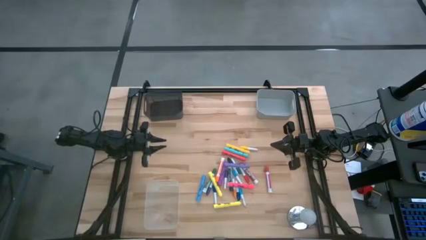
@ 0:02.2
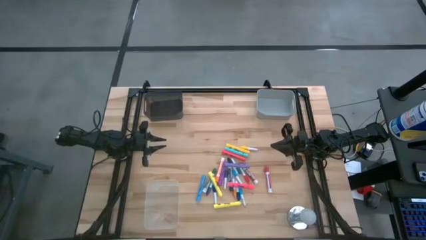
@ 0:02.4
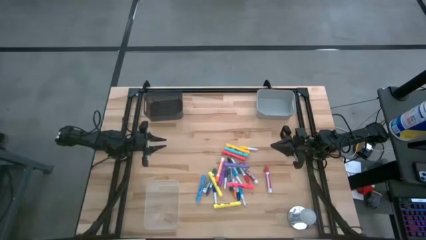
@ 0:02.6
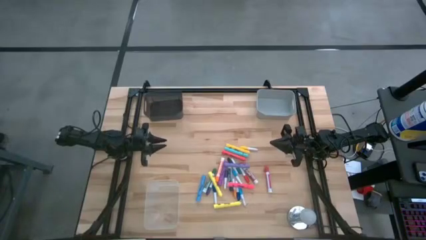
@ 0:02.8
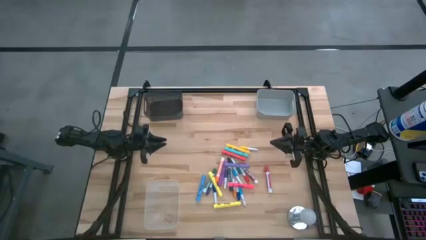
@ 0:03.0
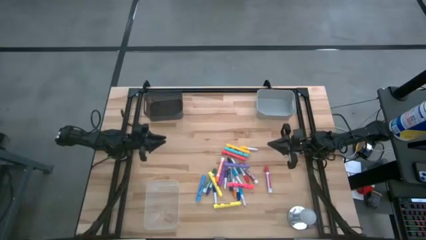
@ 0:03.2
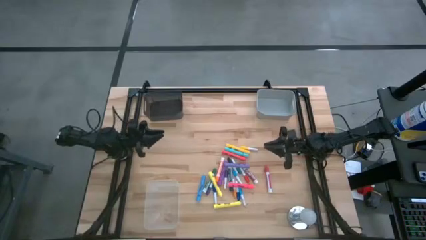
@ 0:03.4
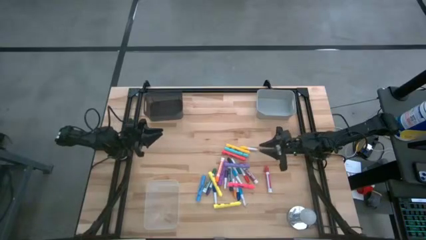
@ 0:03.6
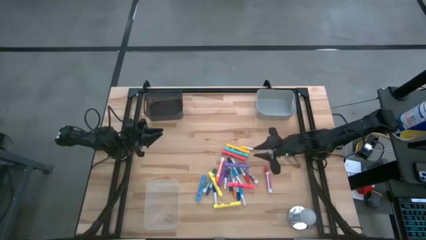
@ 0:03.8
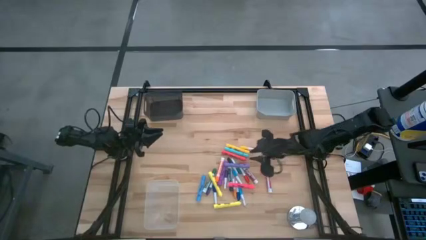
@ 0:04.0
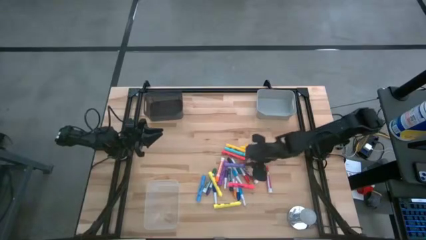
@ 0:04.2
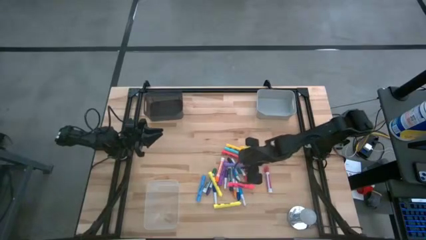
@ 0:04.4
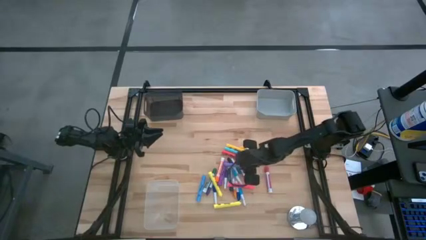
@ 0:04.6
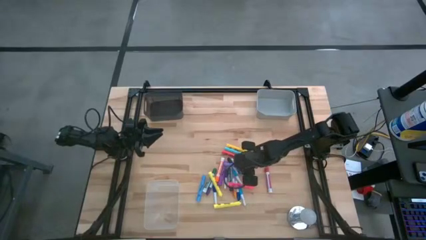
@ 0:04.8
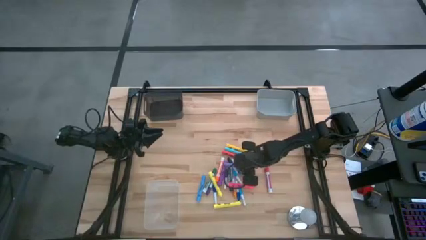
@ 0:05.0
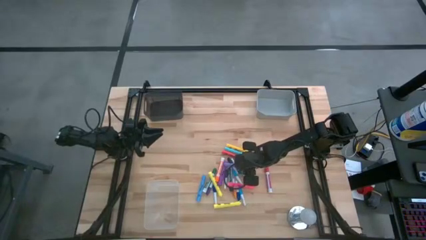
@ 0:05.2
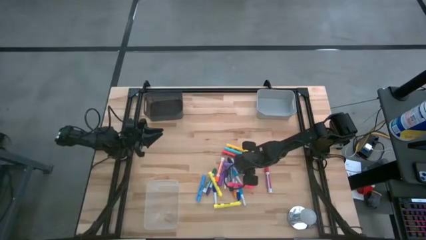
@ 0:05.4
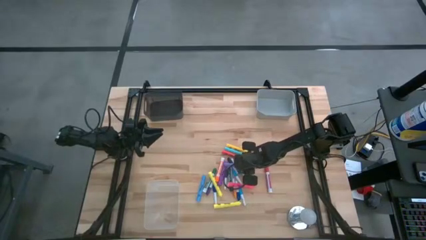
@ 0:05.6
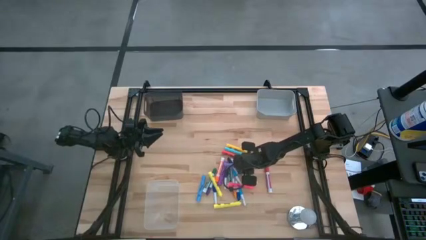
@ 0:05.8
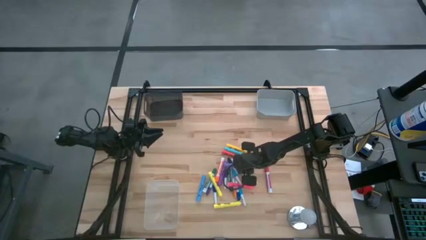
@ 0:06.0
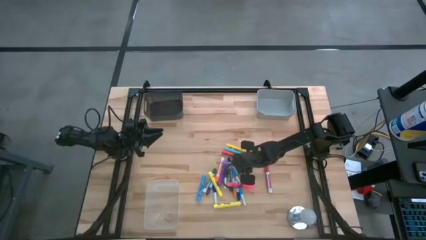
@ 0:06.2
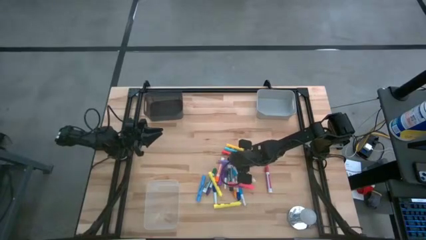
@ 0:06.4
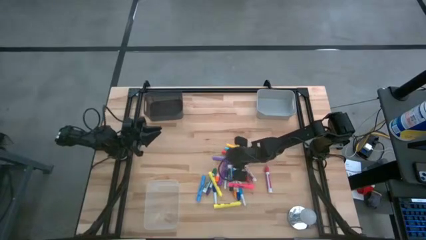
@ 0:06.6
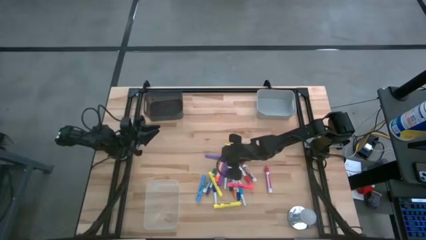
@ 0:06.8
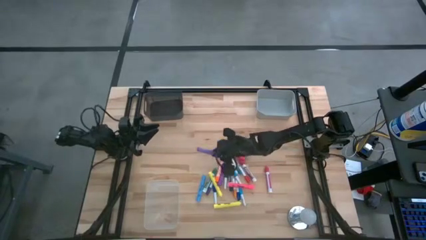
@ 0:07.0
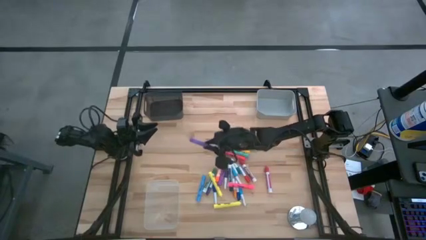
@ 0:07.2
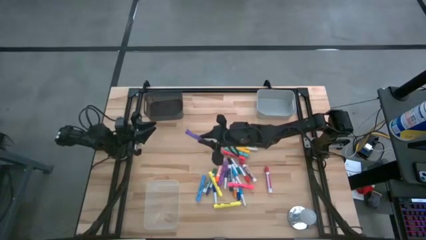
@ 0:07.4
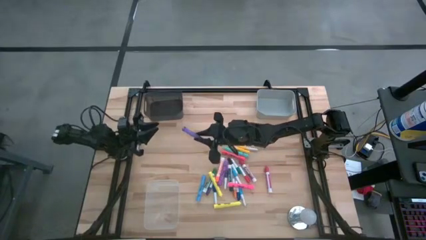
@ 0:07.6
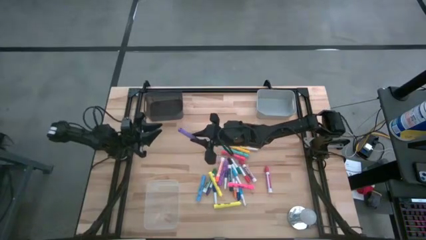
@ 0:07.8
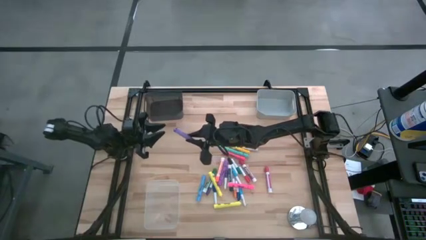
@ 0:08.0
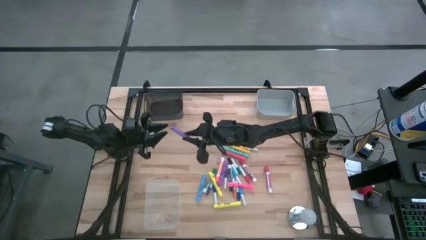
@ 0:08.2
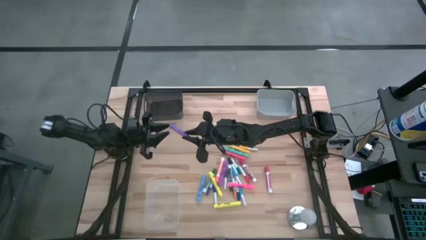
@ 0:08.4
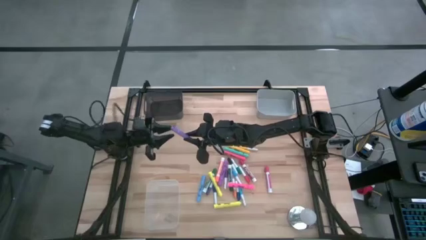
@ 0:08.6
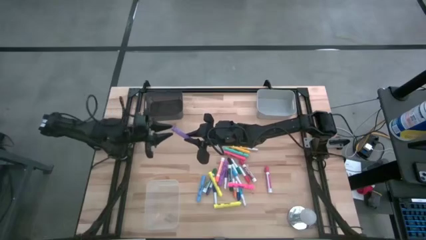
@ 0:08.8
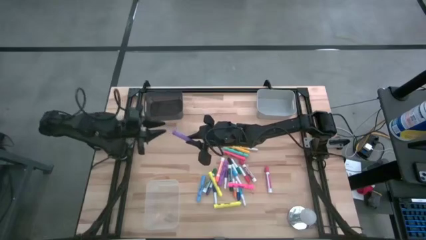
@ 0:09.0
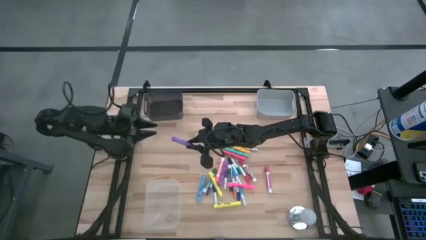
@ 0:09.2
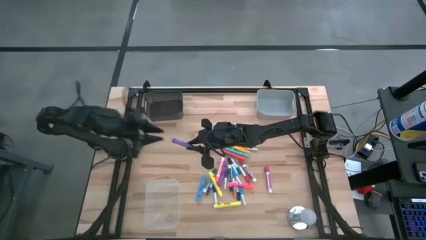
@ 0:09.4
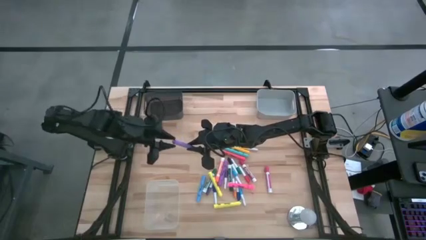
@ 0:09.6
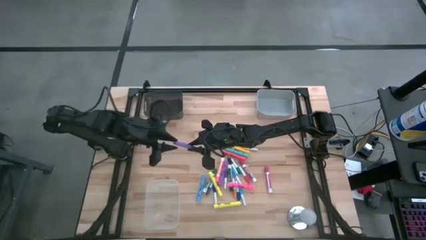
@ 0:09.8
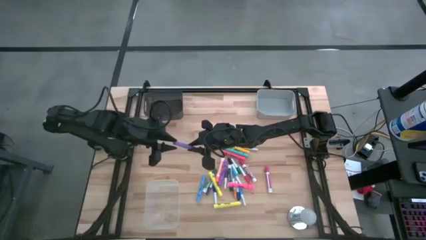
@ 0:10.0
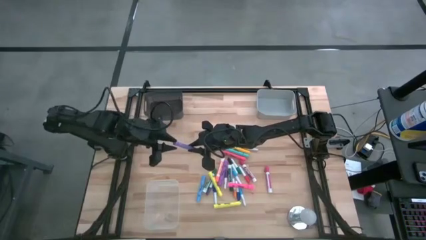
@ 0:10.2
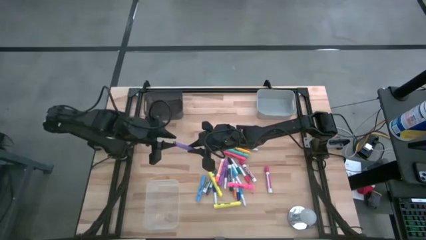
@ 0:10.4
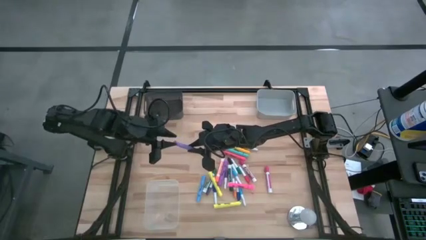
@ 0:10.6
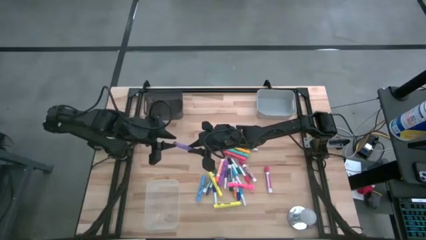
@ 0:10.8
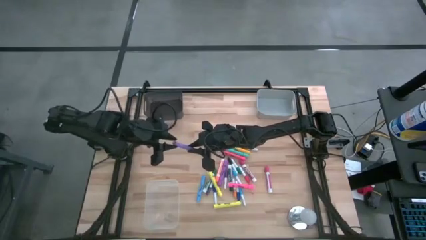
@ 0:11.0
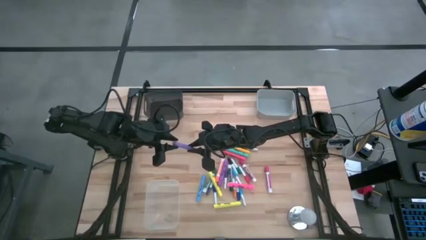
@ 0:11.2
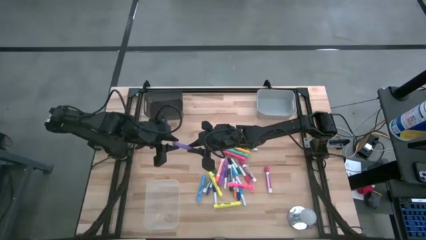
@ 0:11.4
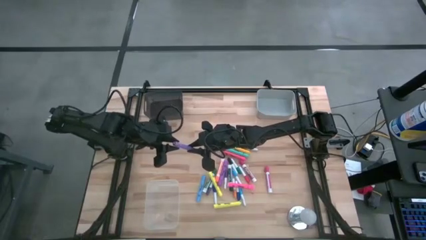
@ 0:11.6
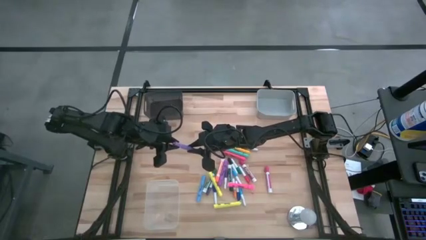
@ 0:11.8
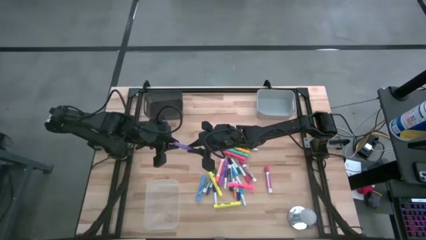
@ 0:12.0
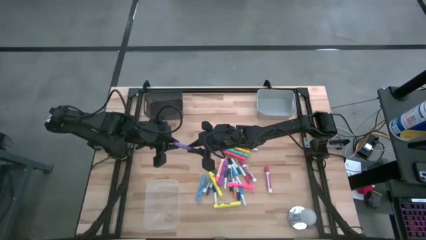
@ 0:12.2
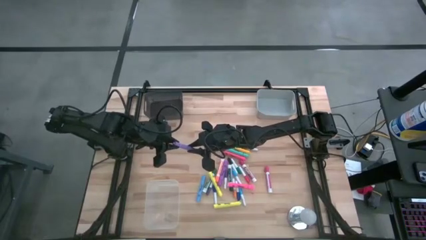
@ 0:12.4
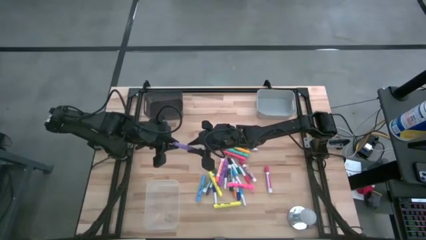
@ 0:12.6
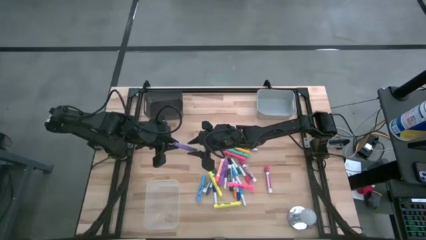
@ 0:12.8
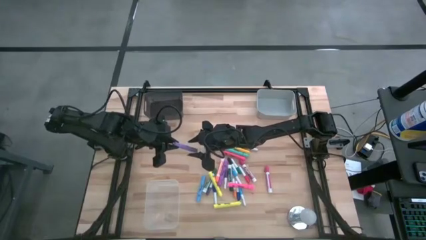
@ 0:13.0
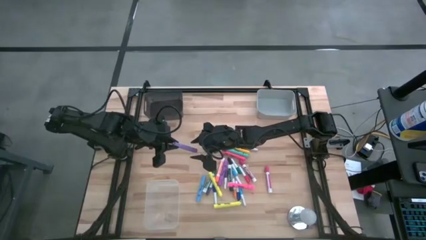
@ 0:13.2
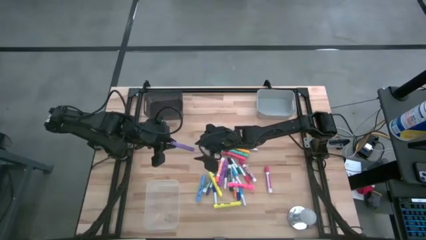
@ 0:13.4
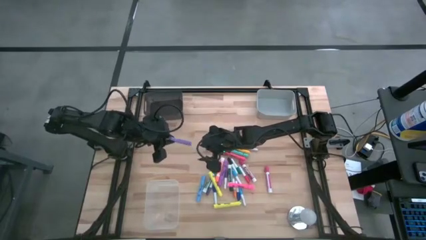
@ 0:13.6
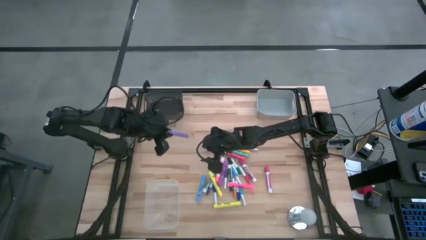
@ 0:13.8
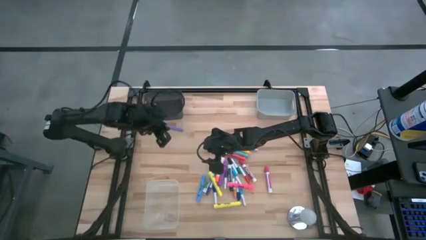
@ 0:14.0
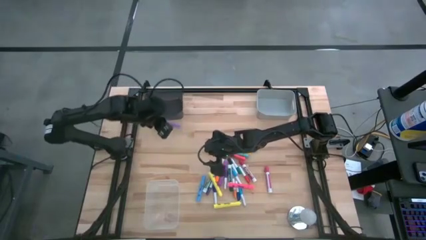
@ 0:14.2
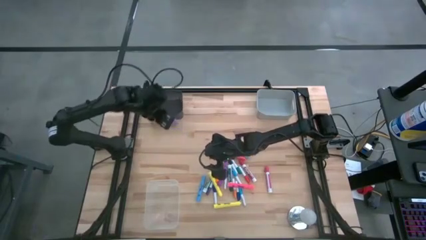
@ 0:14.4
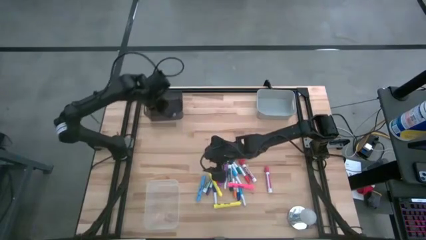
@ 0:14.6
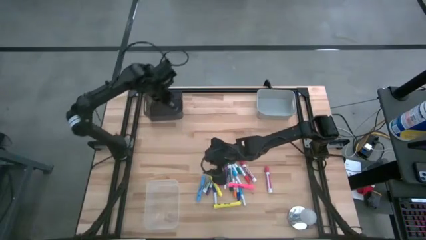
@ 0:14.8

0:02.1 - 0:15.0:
Task: Pick & Place Markers
Put the violet highlighter pen into the black bin
